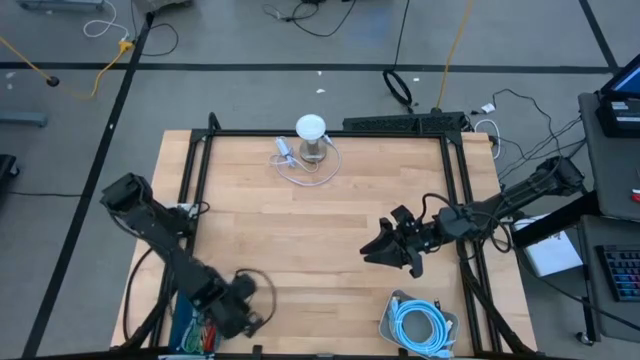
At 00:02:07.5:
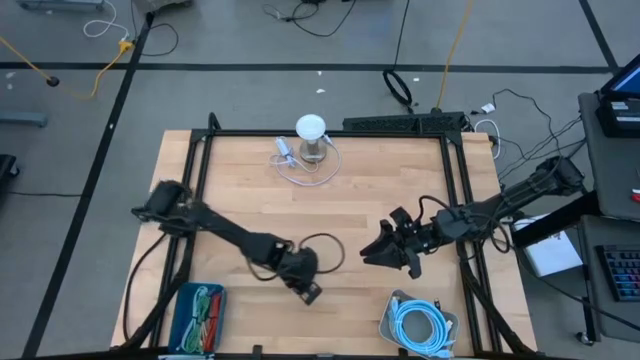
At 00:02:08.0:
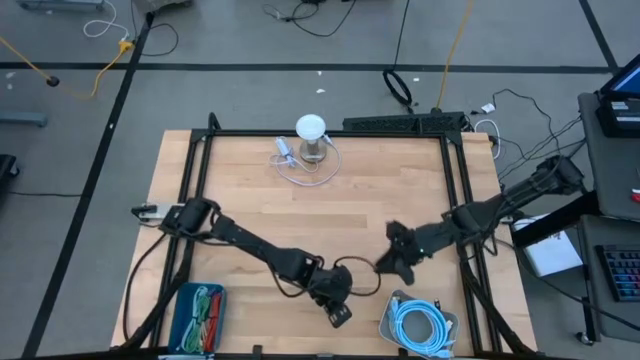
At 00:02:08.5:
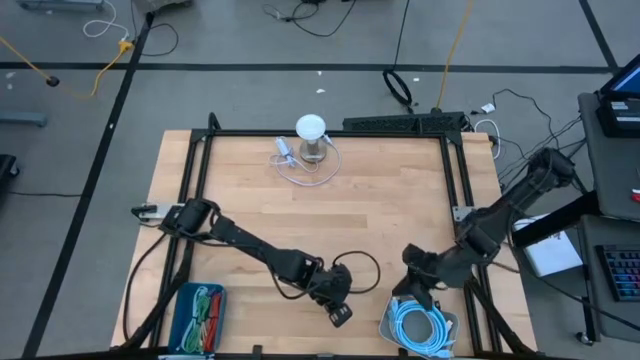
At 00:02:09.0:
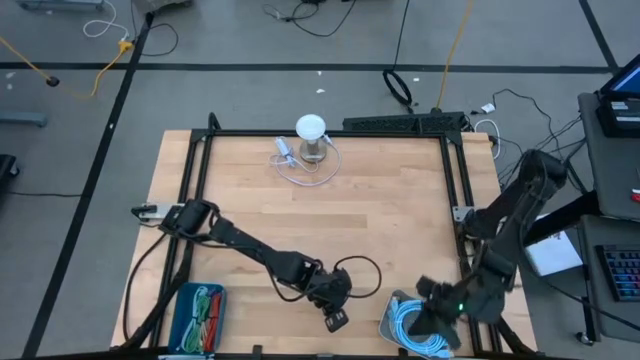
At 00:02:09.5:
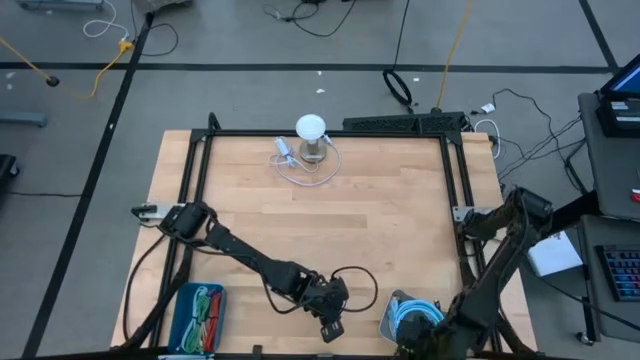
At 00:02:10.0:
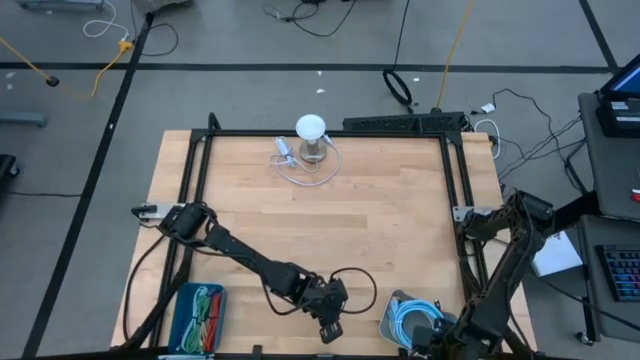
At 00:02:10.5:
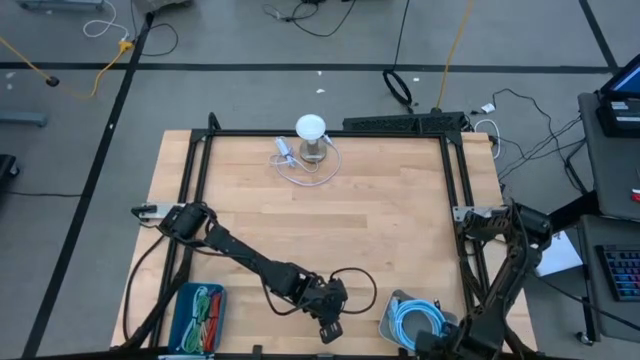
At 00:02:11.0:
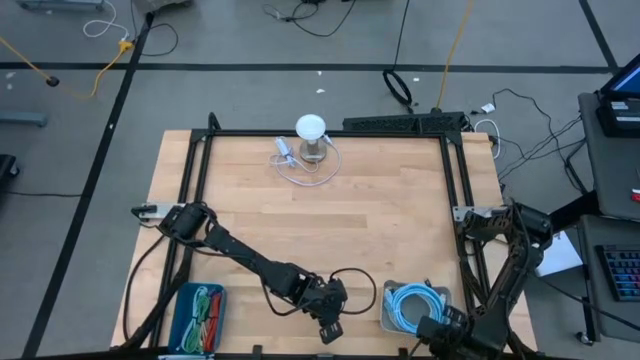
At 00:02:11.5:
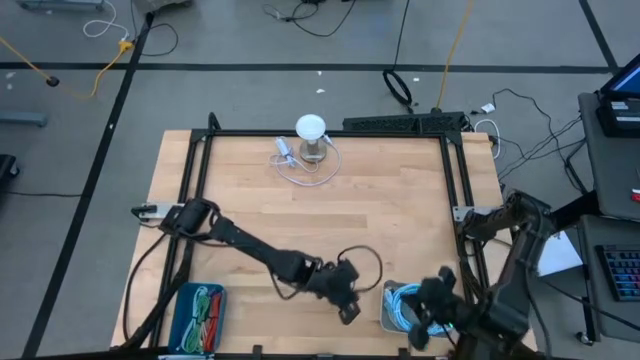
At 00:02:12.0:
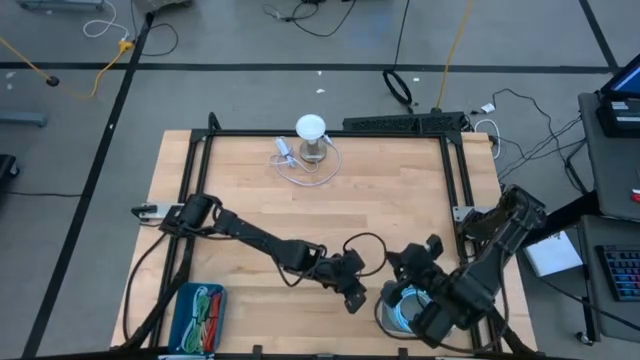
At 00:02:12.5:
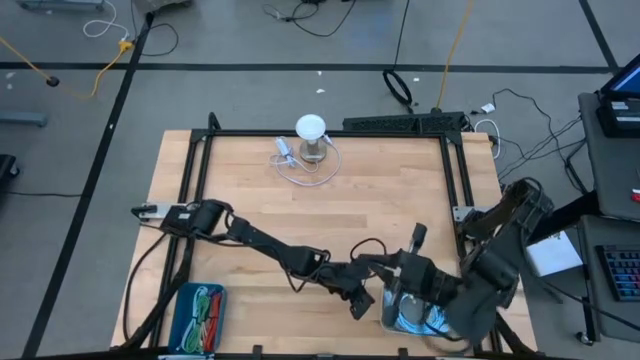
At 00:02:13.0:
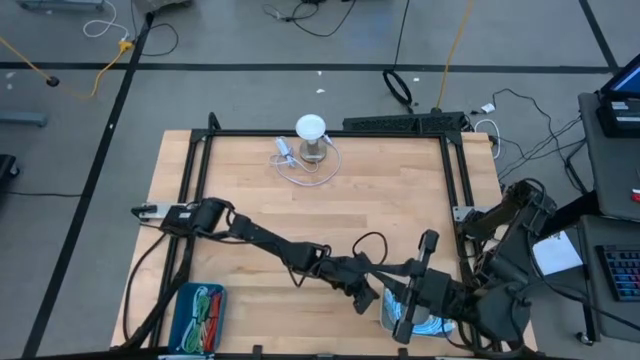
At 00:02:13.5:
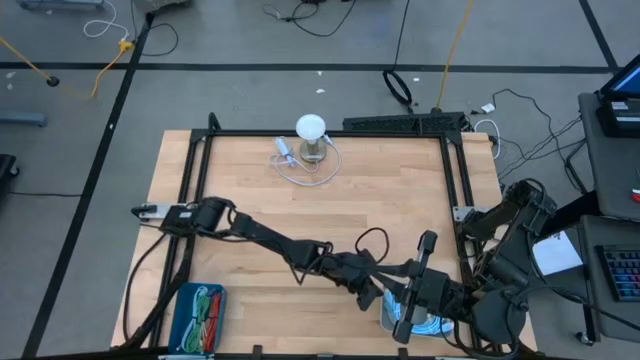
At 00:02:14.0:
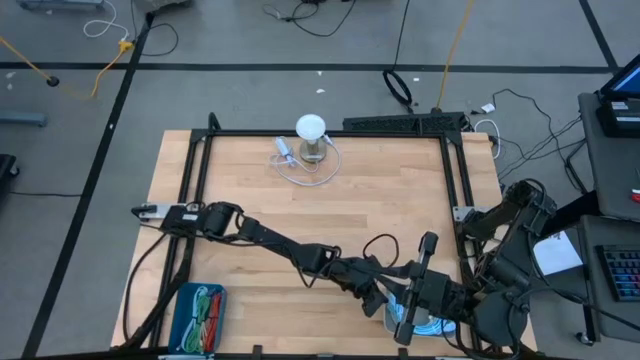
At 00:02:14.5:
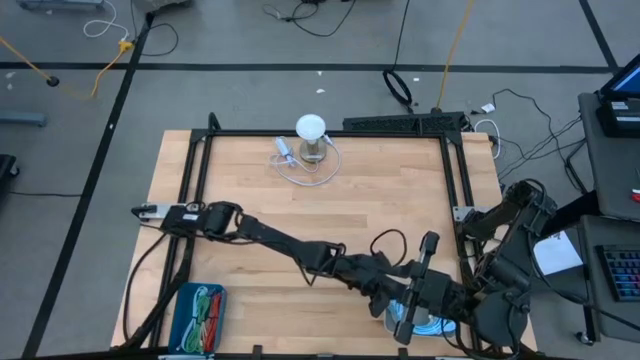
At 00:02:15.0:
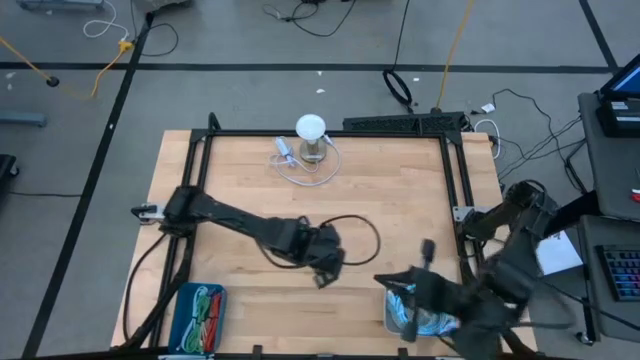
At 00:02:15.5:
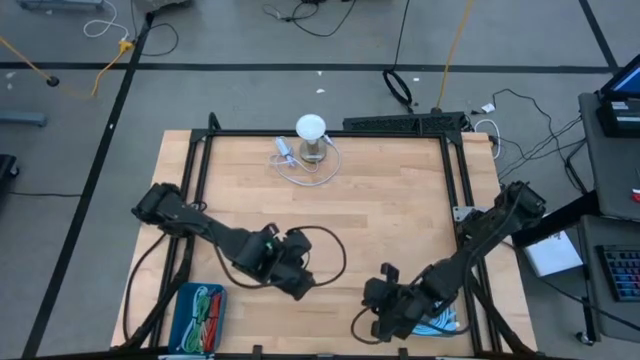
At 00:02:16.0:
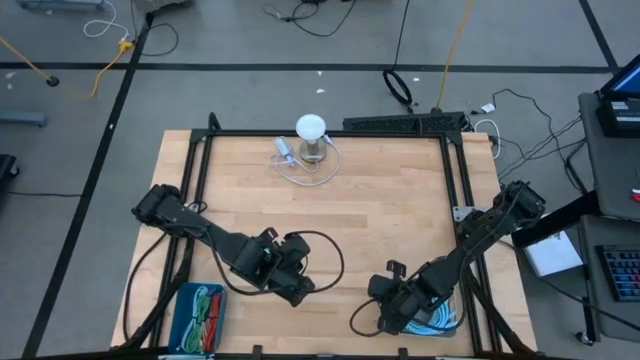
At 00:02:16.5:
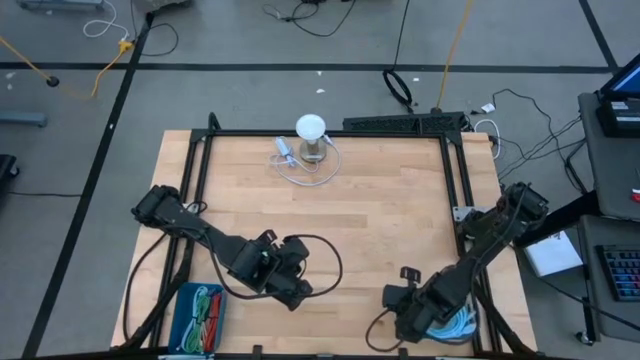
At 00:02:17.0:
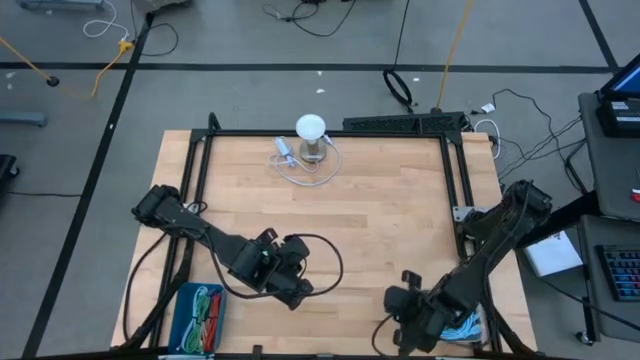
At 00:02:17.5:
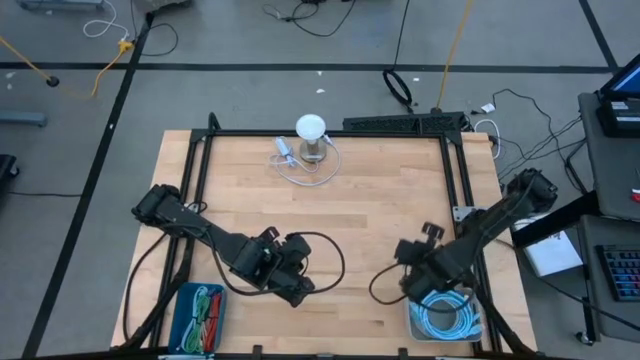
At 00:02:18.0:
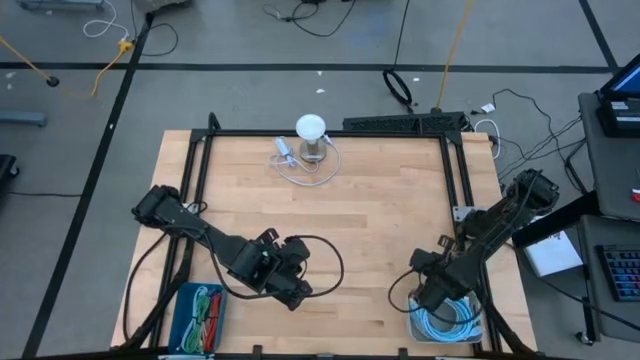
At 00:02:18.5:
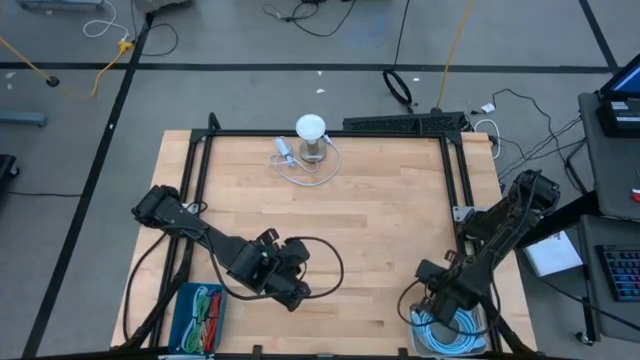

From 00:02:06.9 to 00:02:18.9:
Task: Pick & Place USB Port
Adjust the gray bin

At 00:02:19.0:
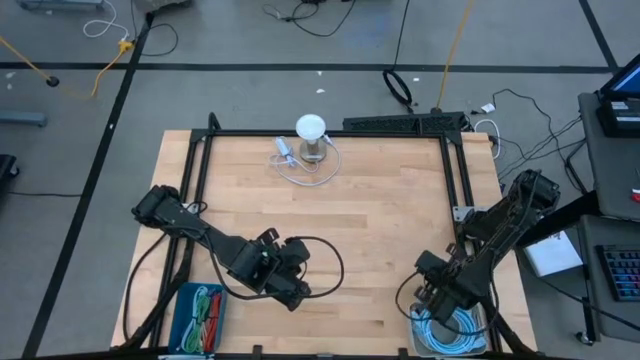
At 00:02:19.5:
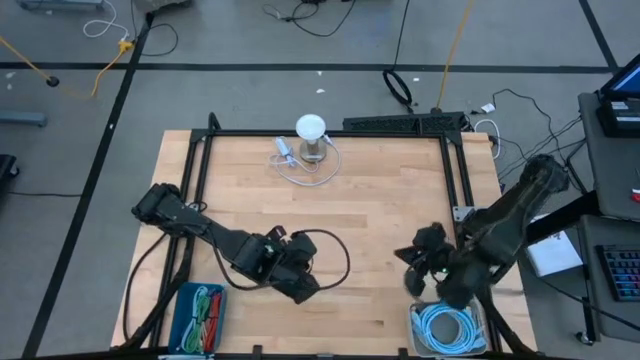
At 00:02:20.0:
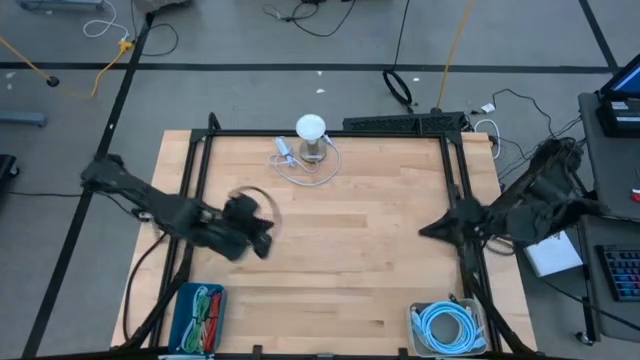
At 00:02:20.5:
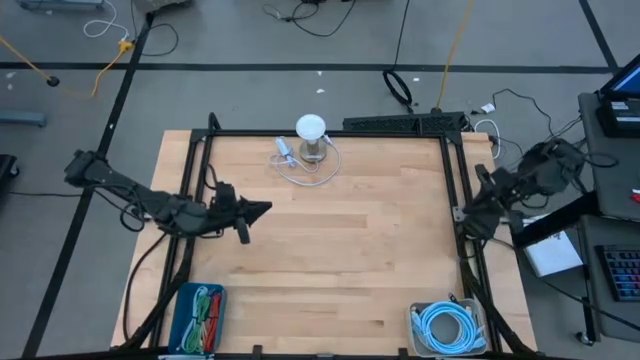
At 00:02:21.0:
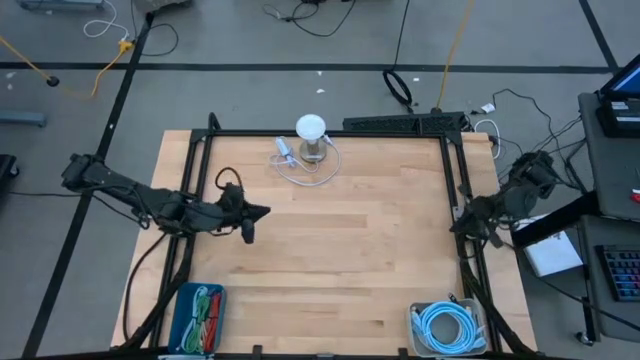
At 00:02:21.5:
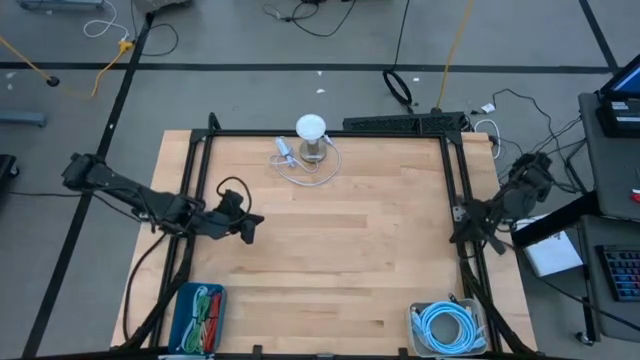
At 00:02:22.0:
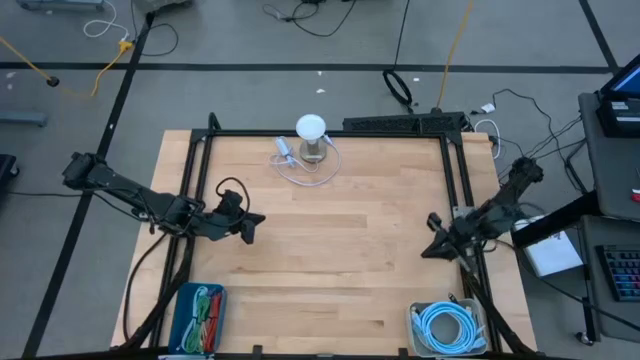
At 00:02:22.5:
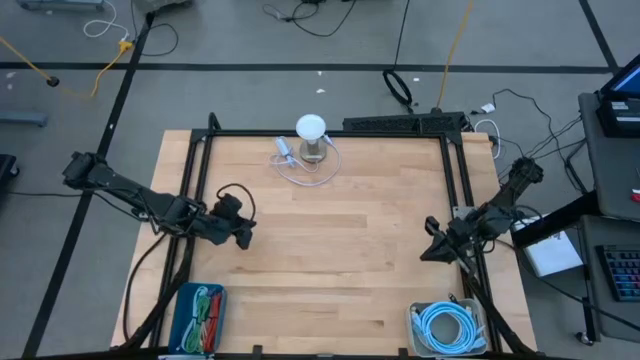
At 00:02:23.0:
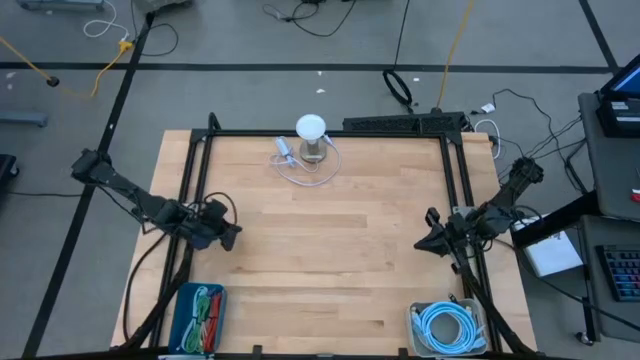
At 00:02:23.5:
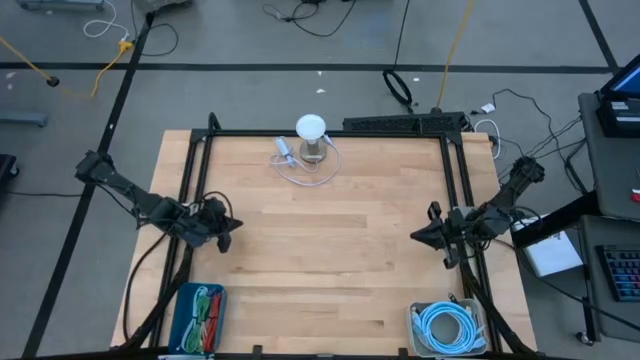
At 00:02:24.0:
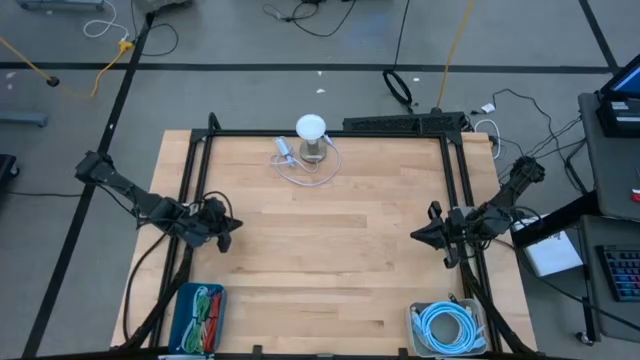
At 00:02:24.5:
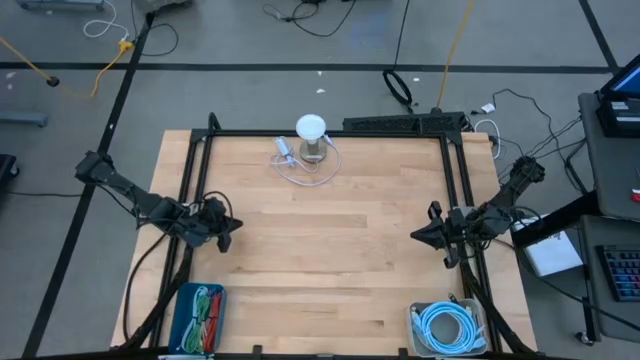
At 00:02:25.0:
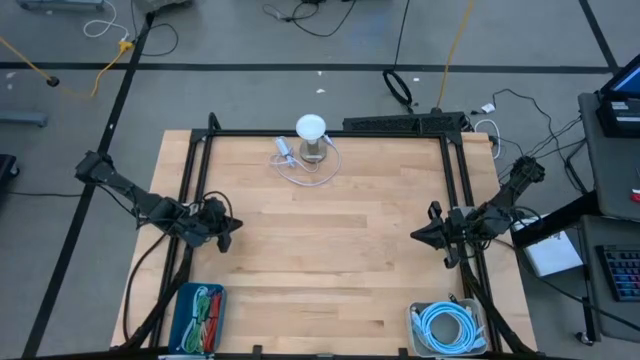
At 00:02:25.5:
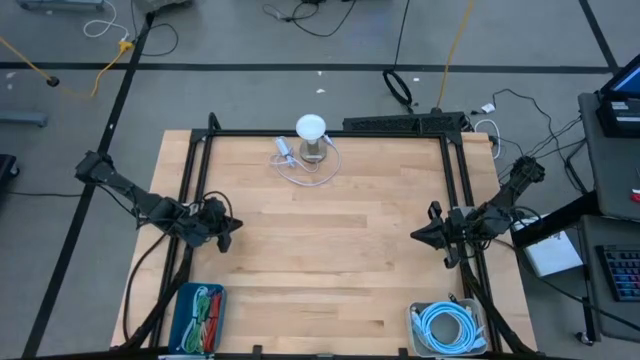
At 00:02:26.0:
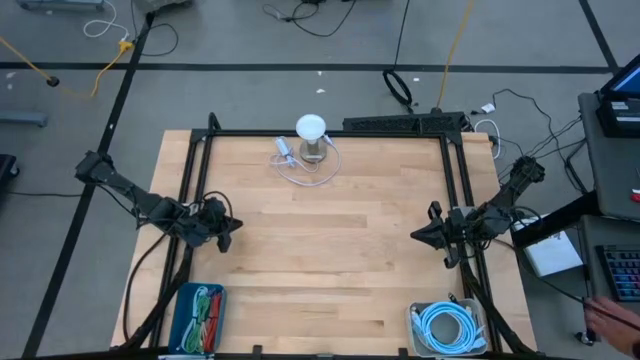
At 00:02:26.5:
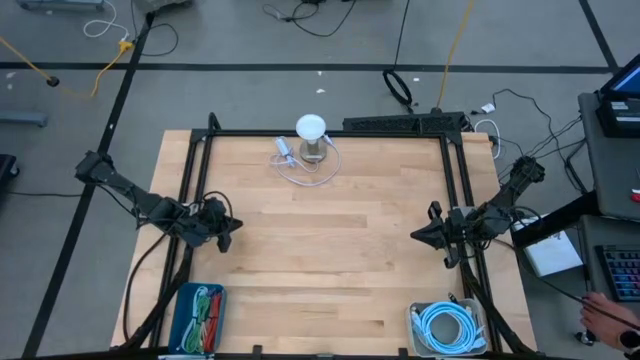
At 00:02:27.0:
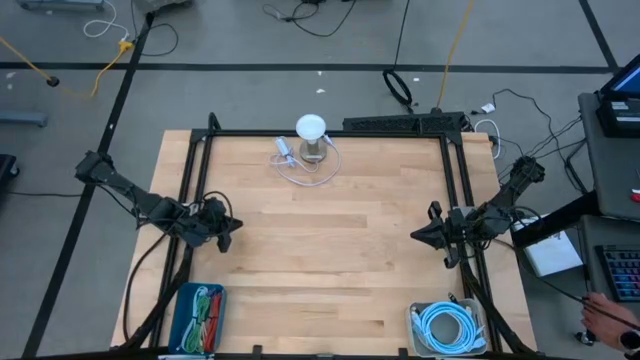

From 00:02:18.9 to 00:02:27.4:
Return to Home Position
